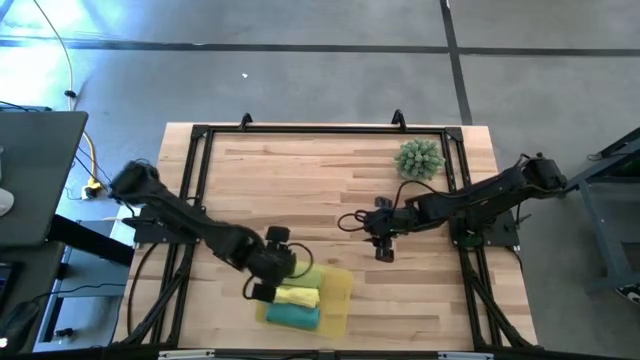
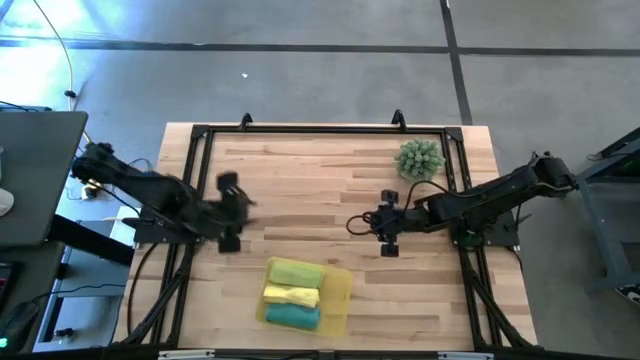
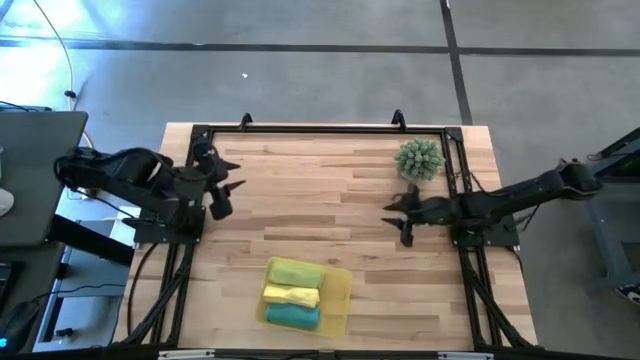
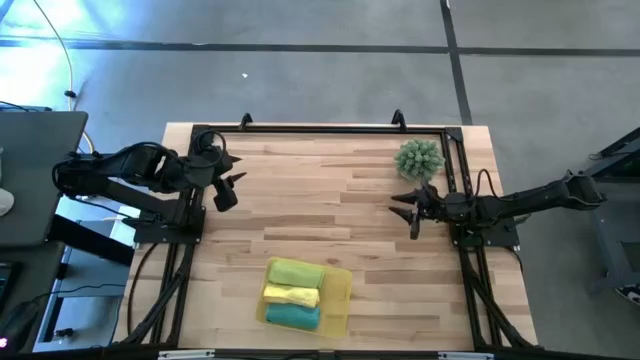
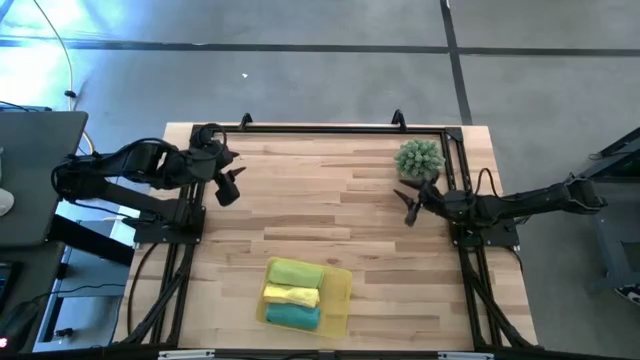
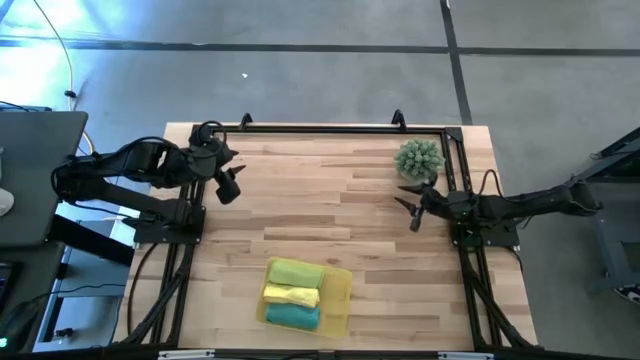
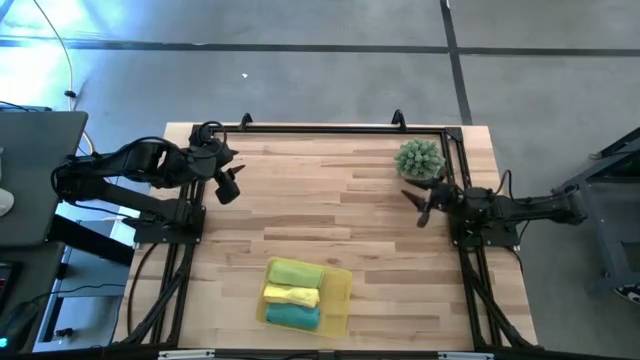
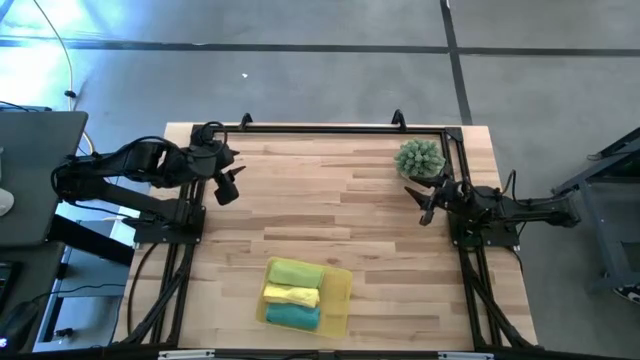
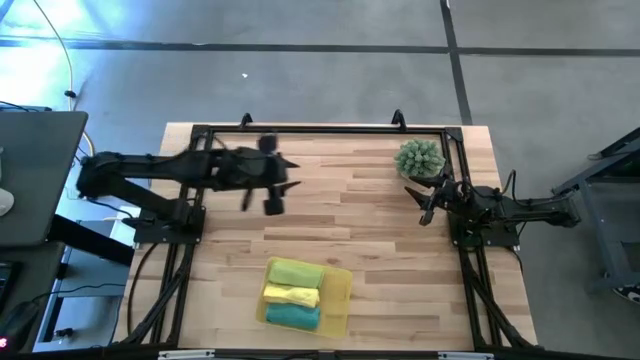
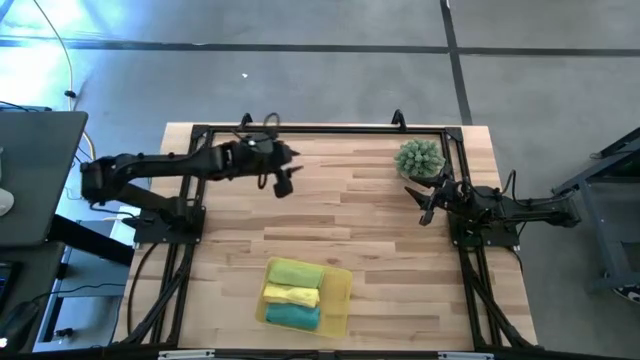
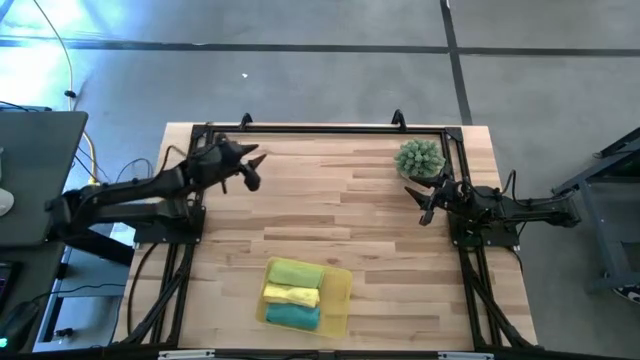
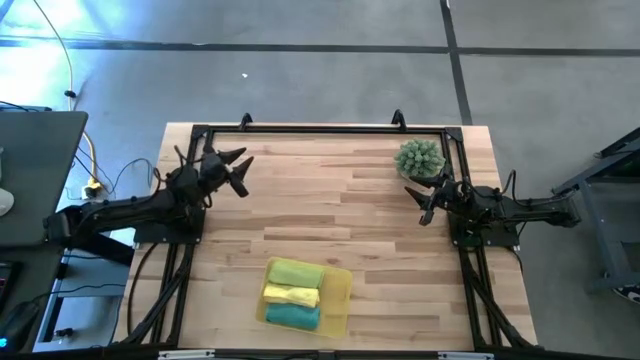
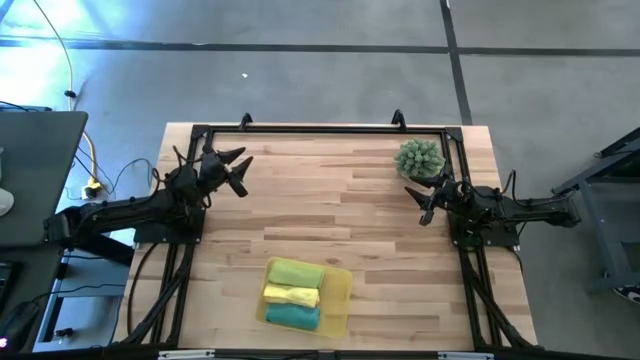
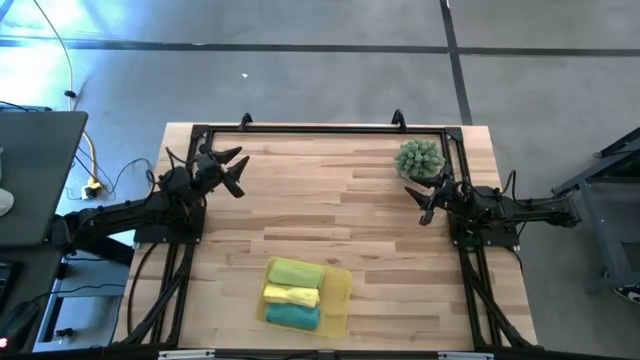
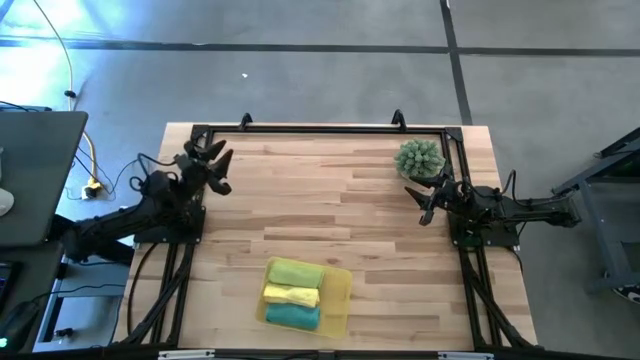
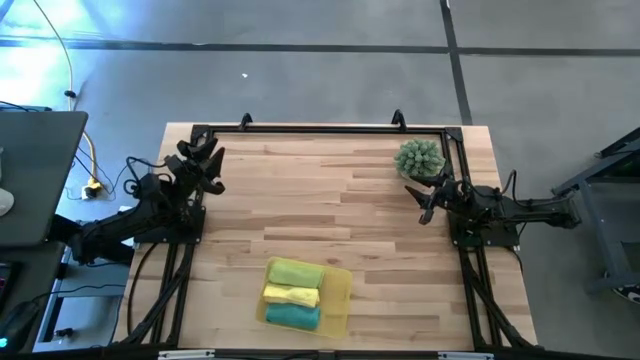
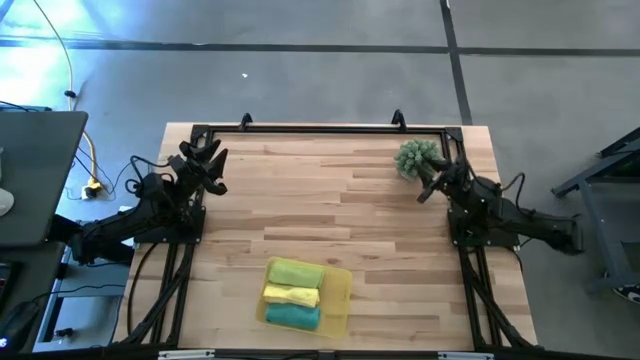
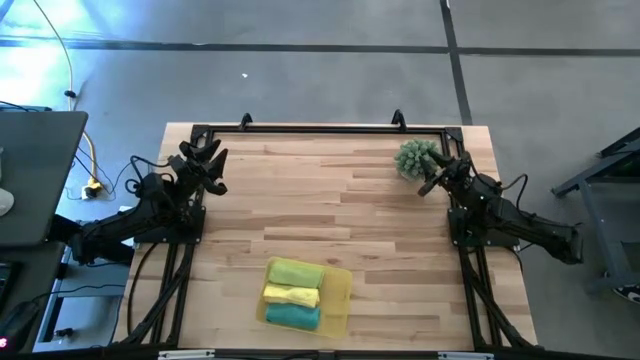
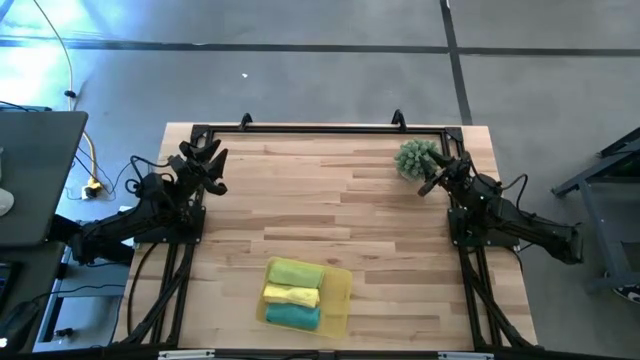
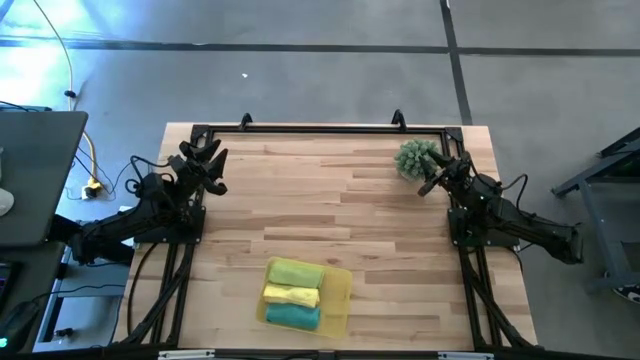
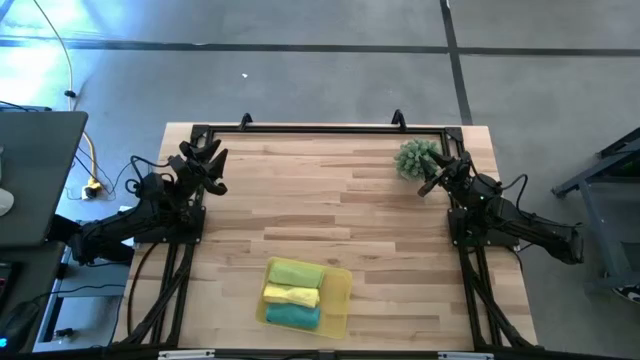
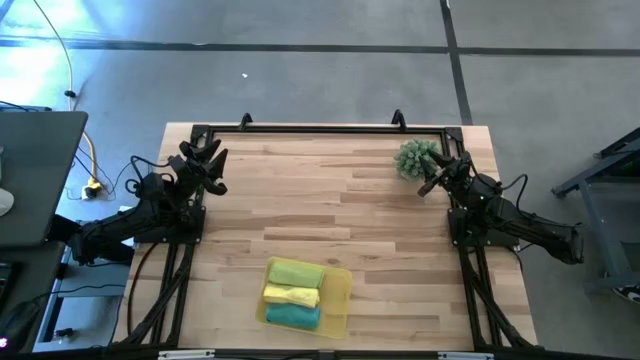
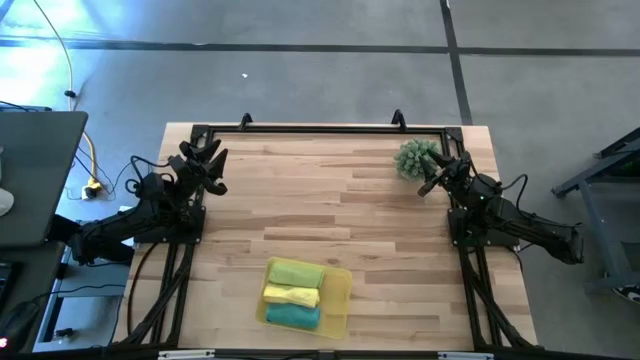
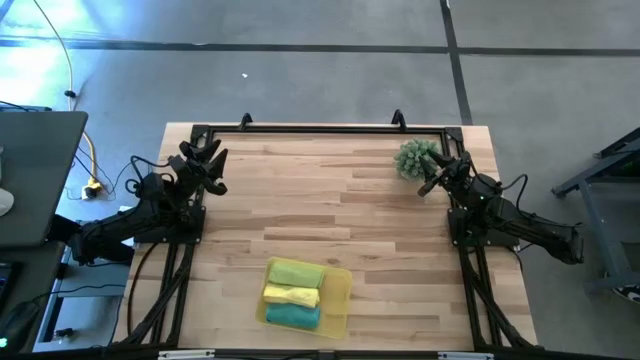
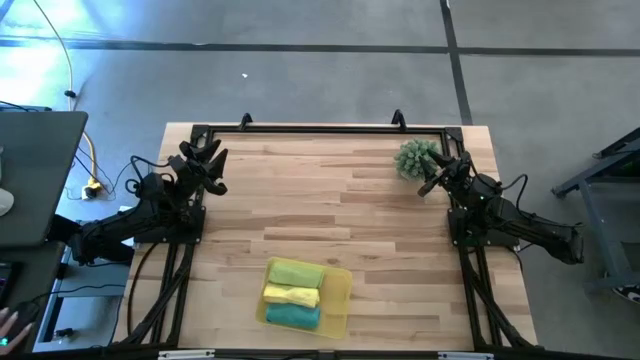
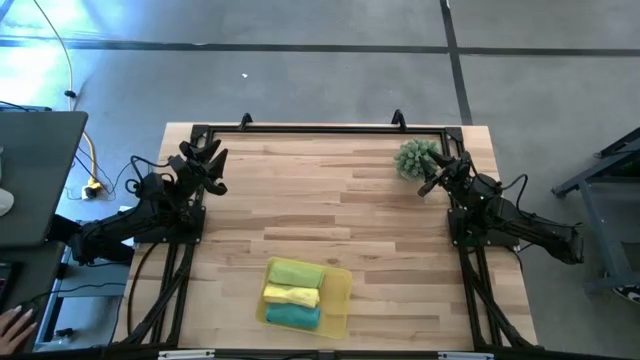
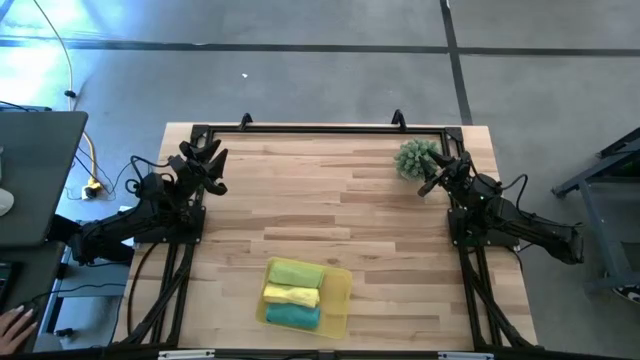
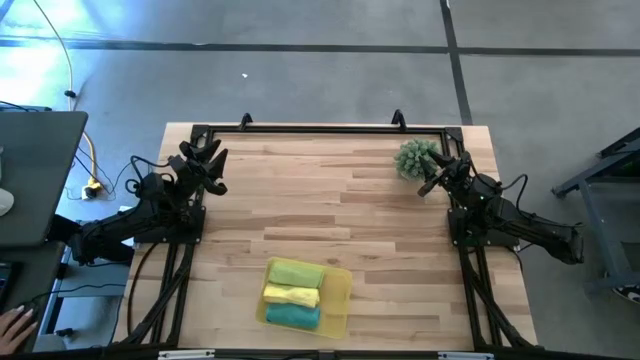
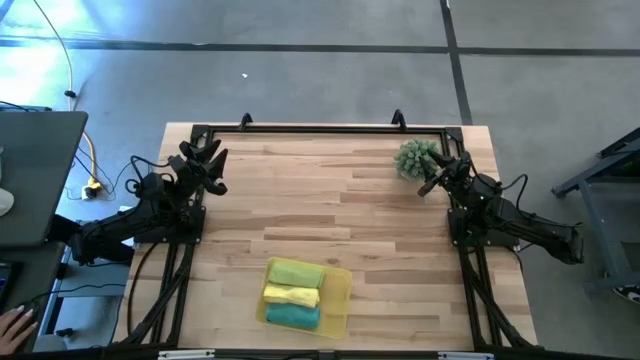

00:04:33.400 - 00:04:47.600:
Task: Roll microfiber towels into tight, uniform cylinder then place into a basket
Return to Home Position

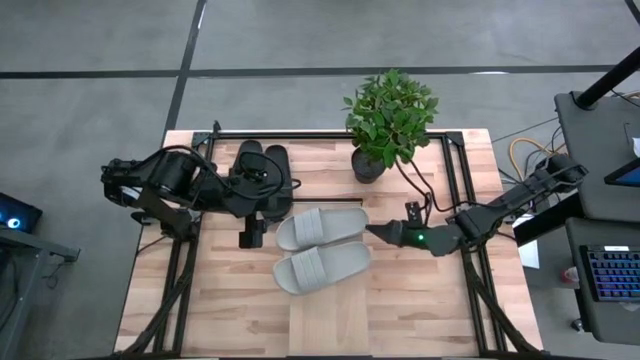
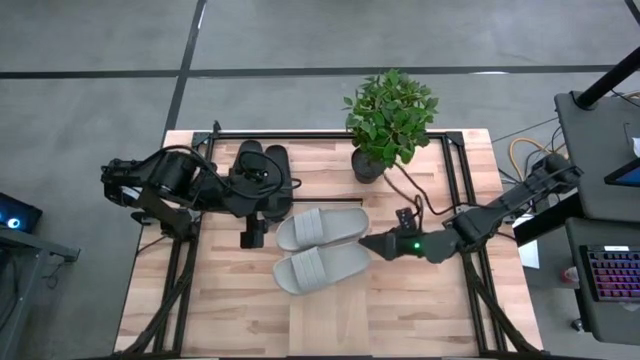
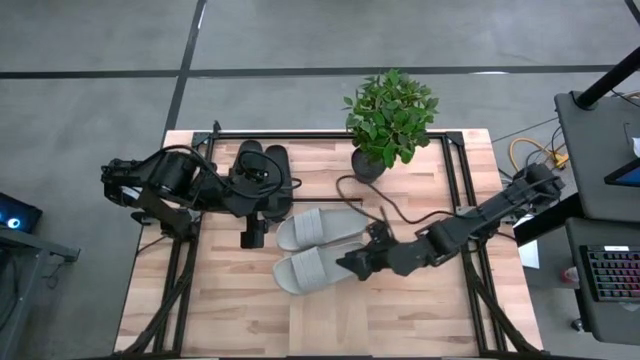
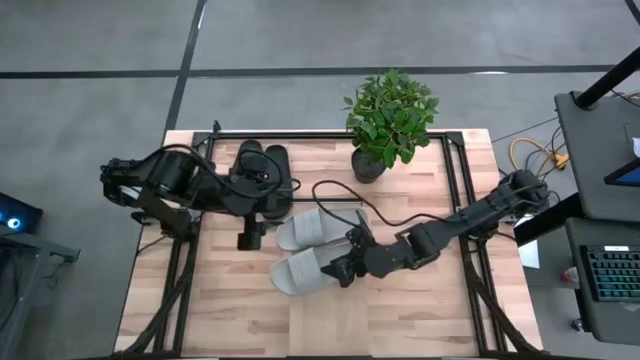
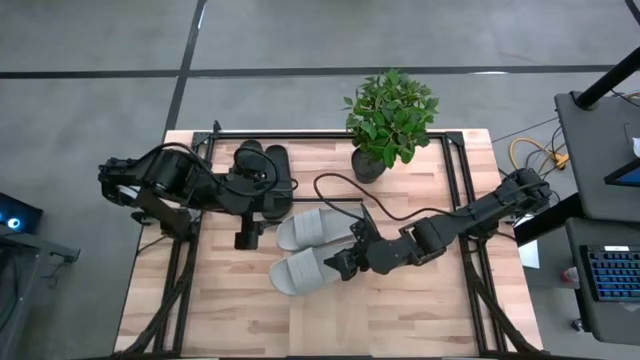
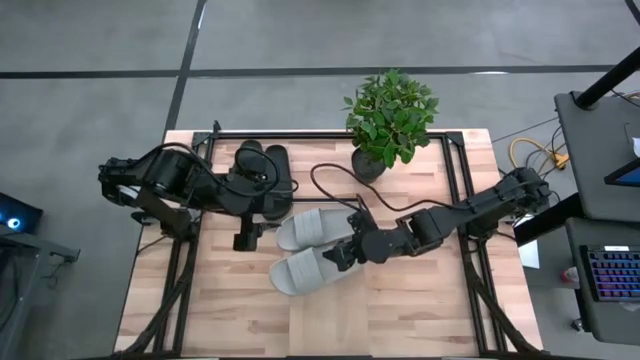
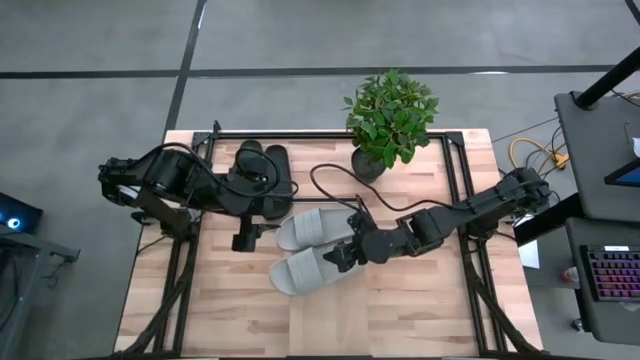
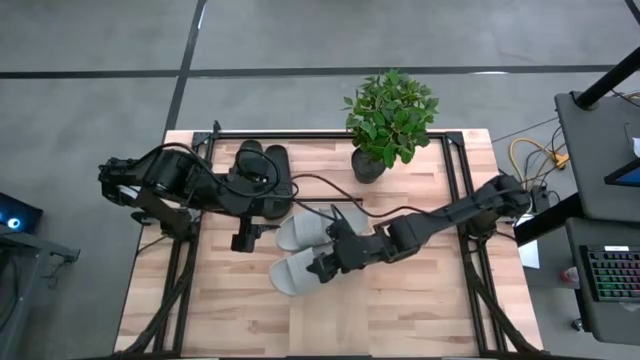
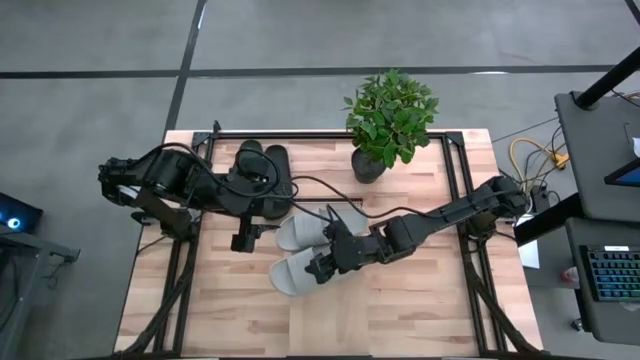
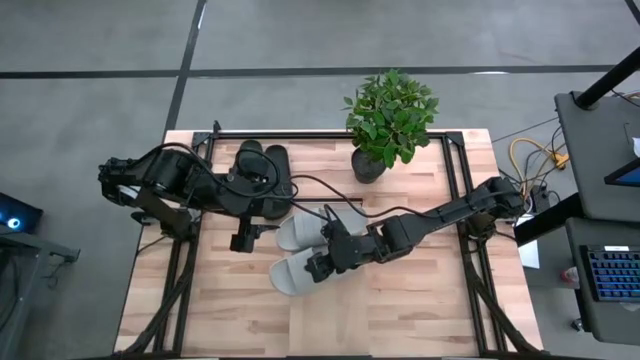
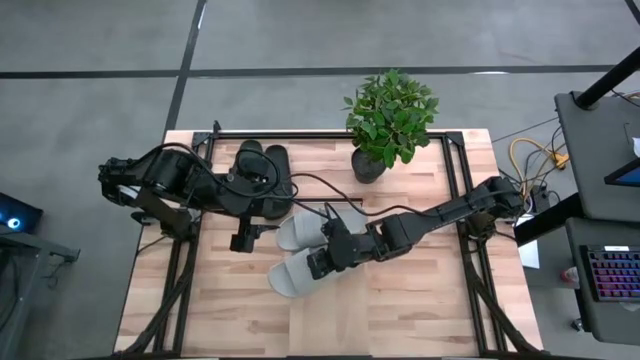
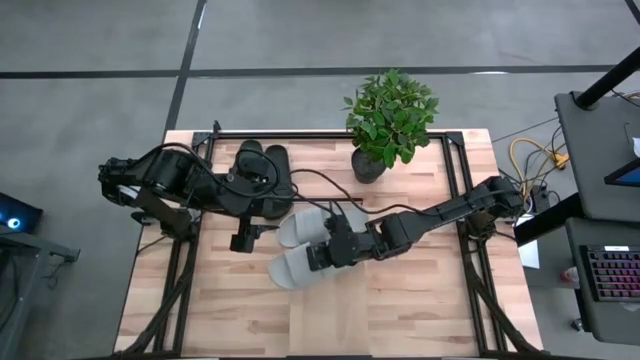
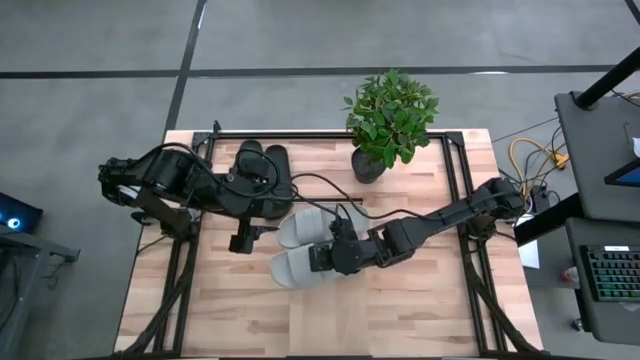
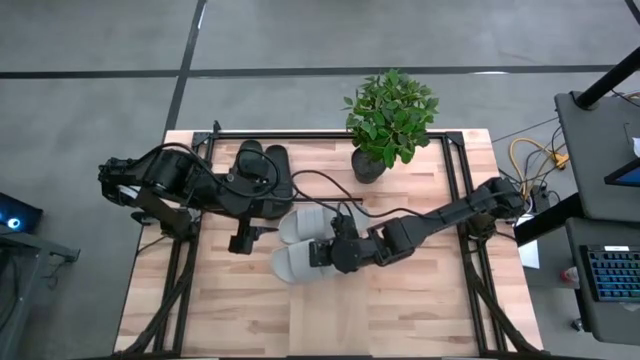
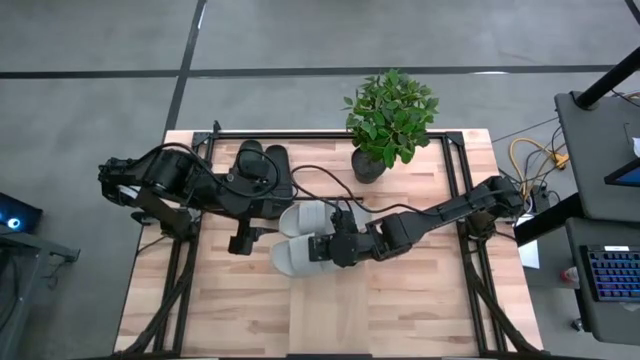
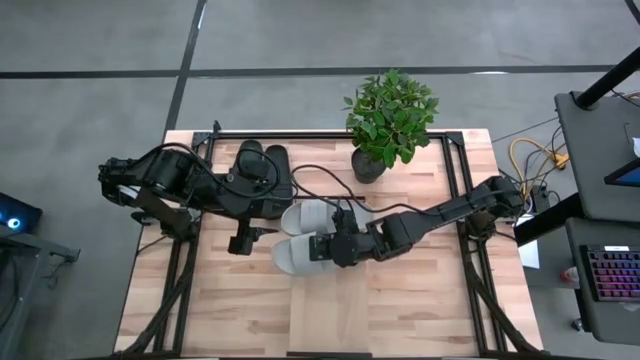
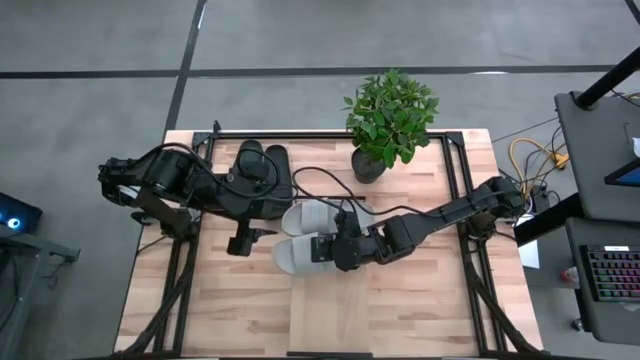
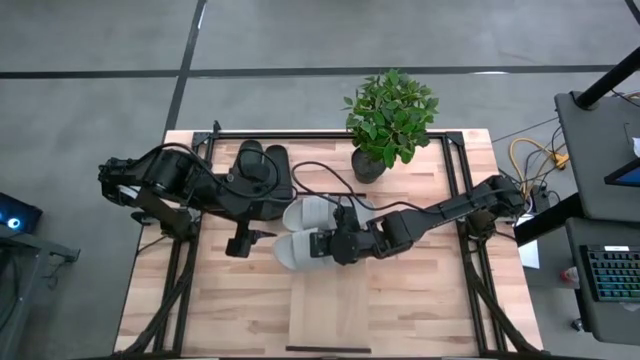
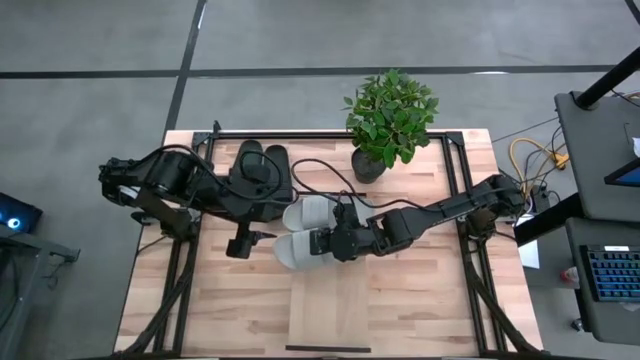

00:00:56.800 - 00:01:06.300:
Task: Pick and place slides into the shelf
Adjust the gray slippers on the shelf
